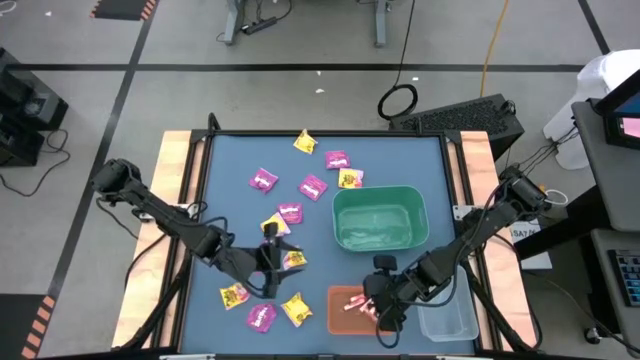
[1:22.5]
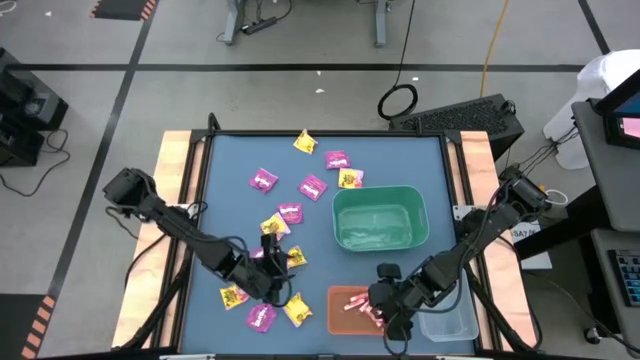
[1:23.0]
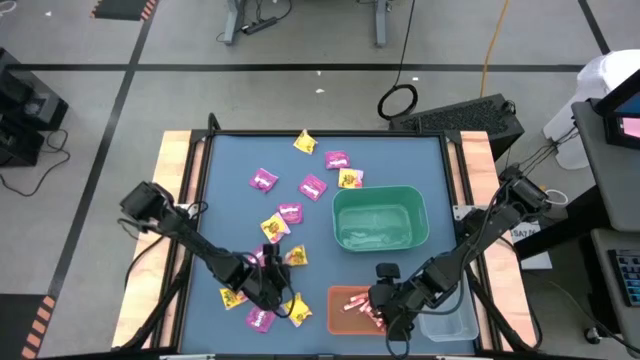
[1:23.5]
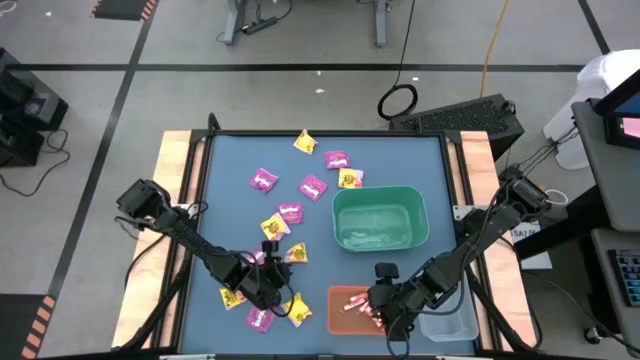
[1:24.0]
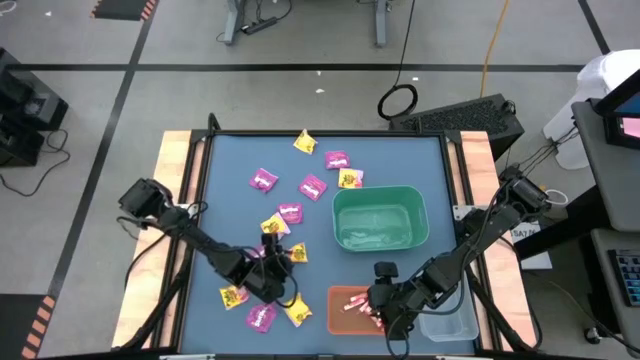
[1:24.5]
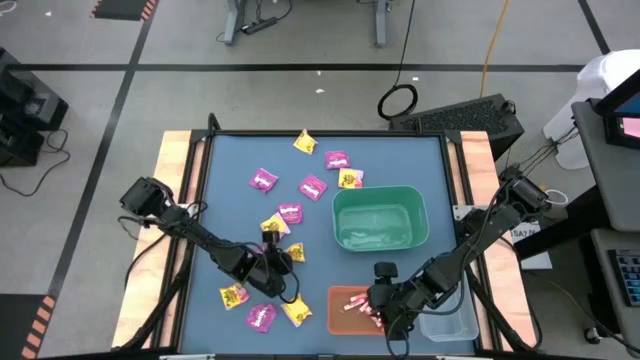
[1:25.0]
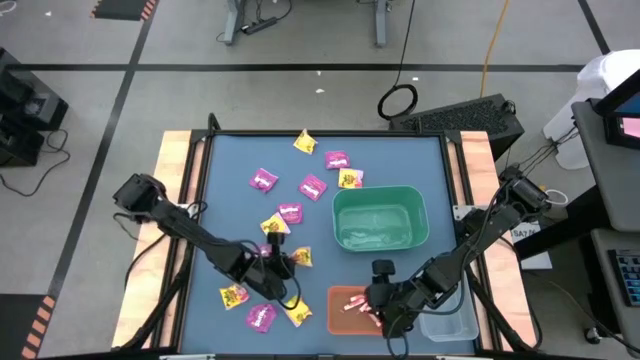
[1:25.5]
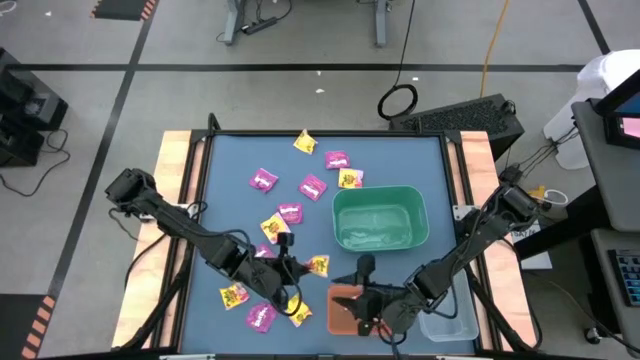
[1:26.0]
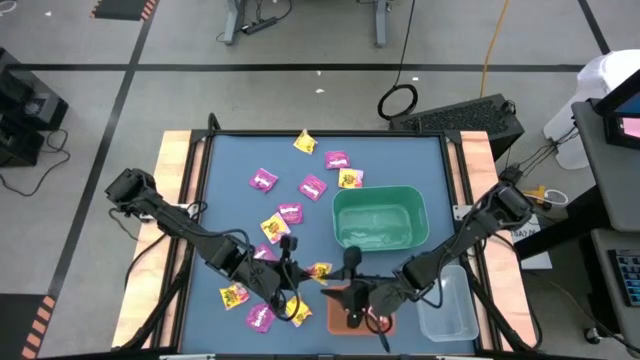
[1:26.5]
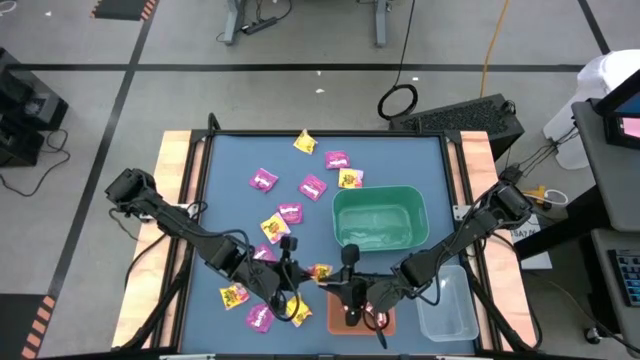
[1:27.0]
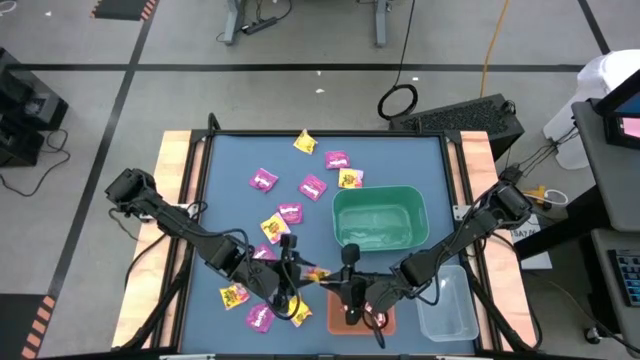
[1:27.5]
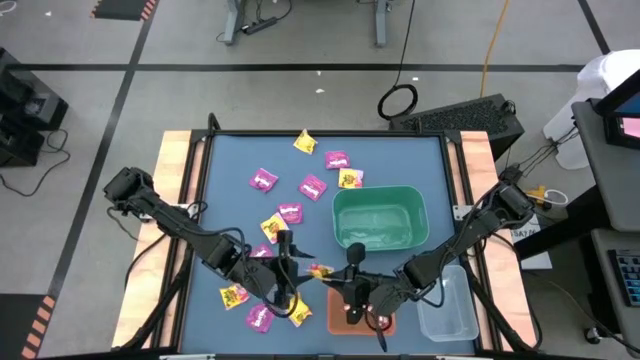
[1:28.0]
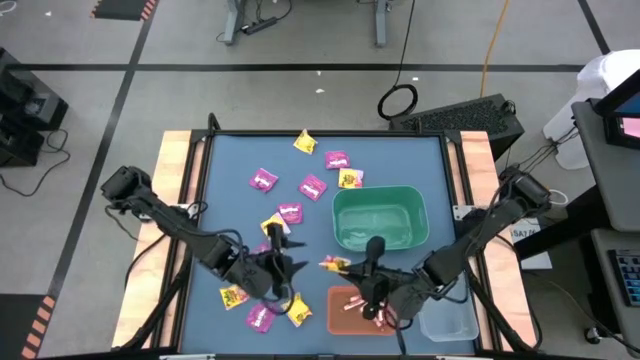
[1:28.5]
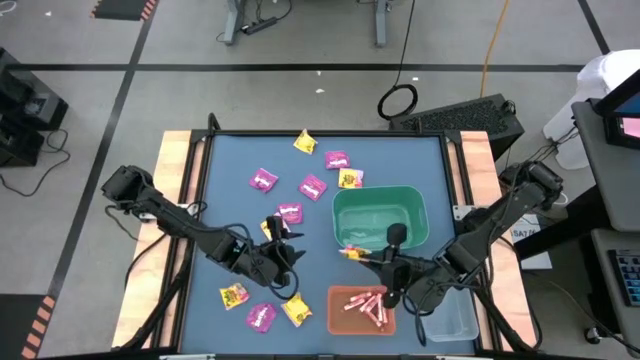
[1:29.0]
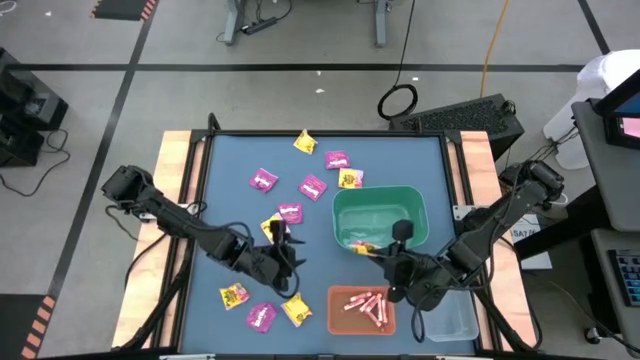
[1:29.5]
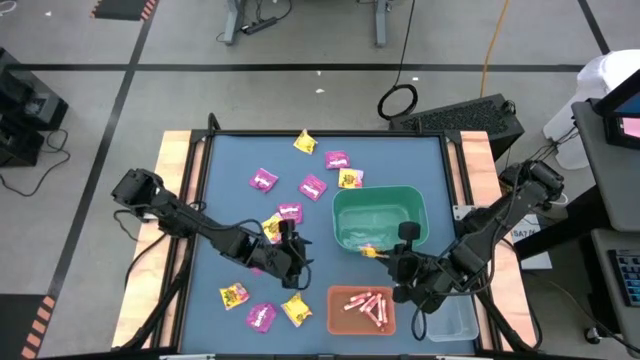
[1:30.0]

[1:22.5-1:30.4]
Task: Sort candy
Put the yellow candy pack into the green bin

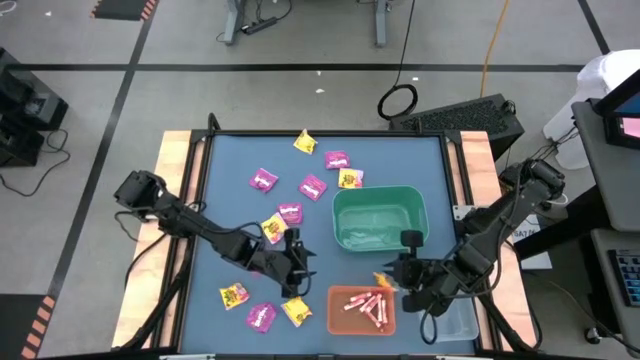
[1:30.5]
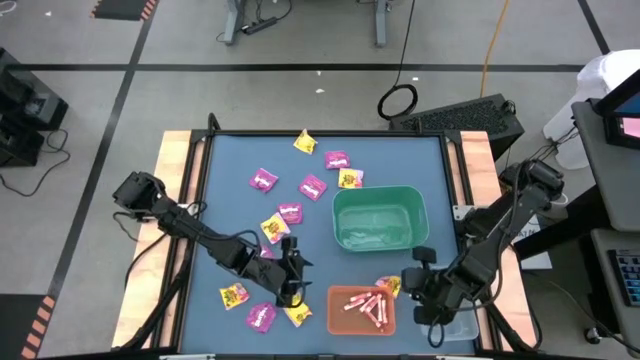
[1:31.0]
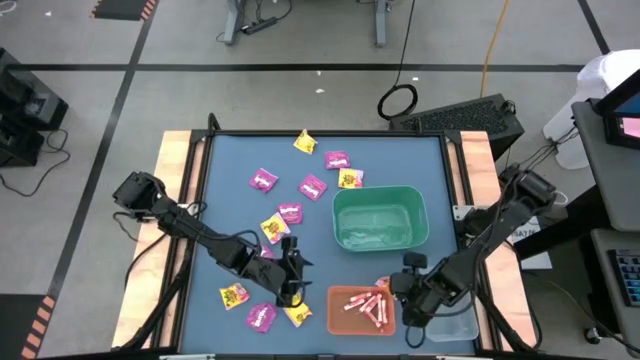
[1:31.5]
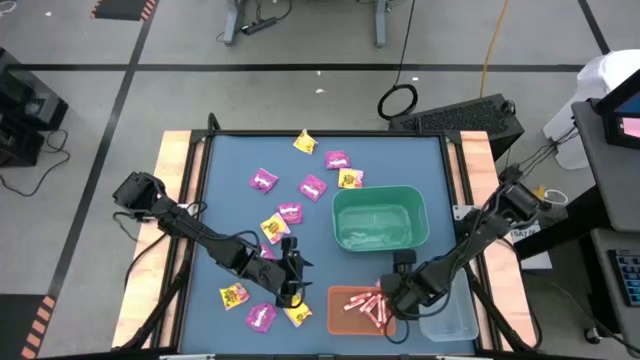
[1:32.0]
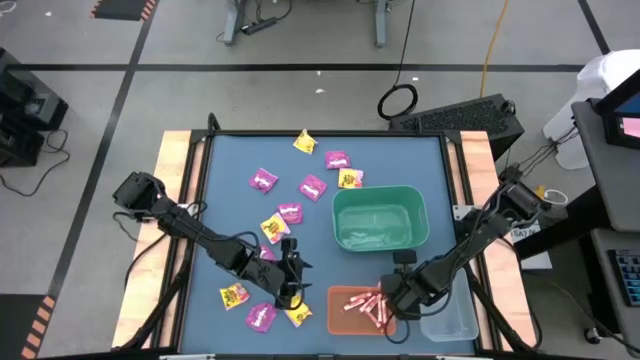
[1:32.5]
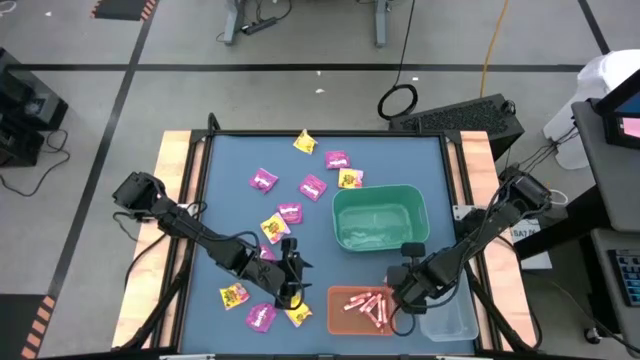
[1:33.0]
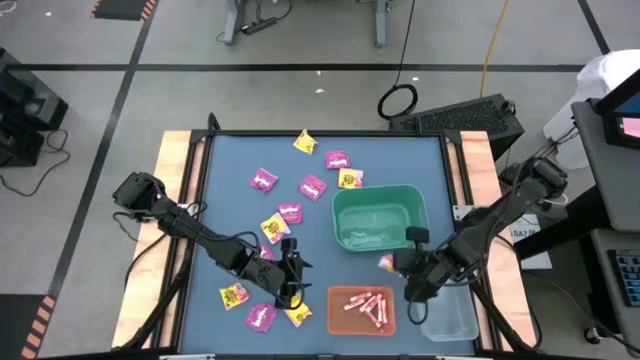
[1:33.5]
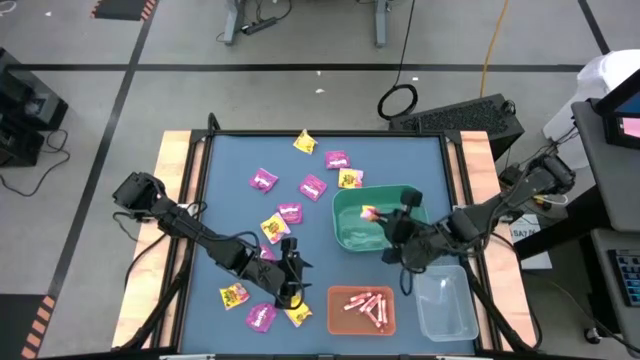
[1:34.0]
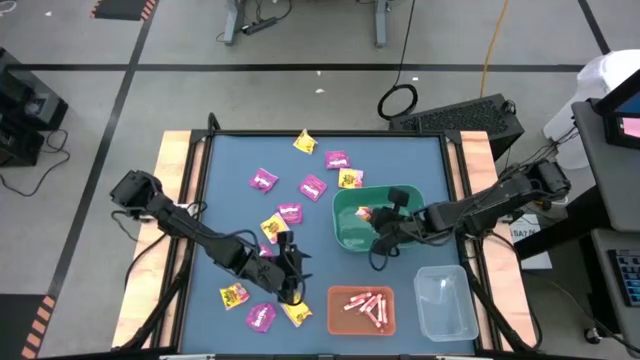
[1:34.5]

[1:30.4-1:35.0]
Put the yellow candy pack into the green bin

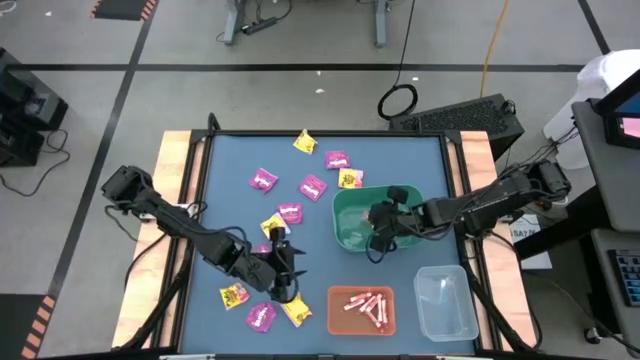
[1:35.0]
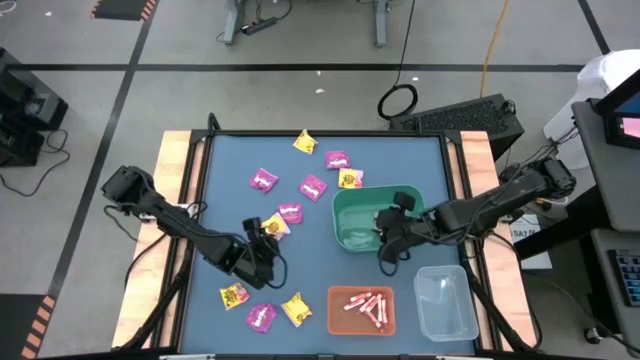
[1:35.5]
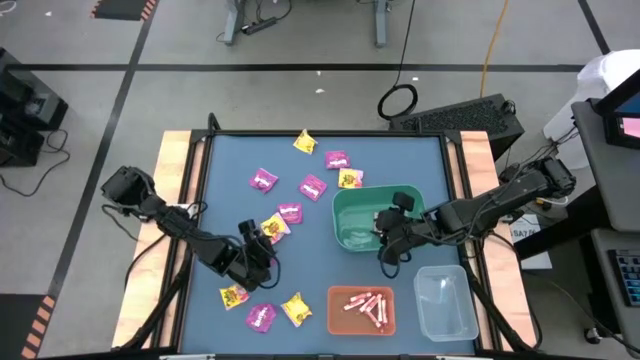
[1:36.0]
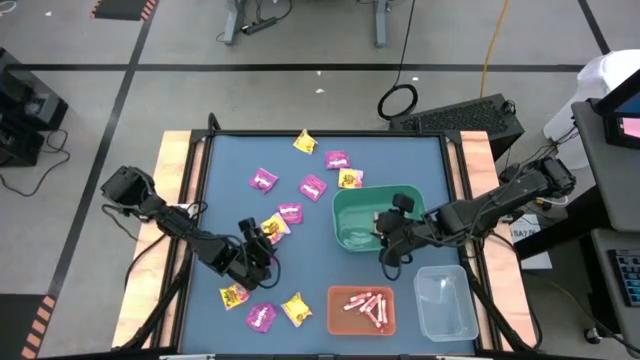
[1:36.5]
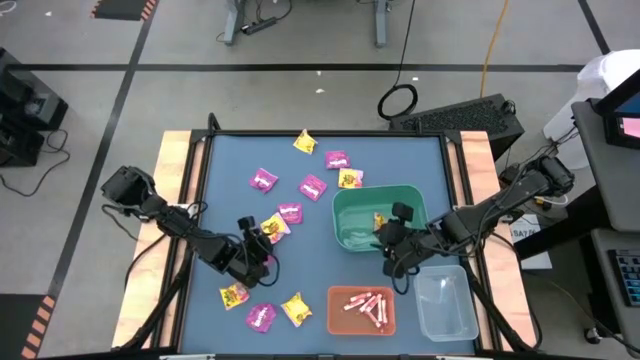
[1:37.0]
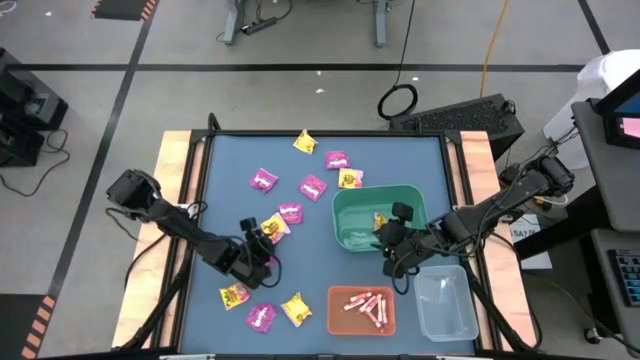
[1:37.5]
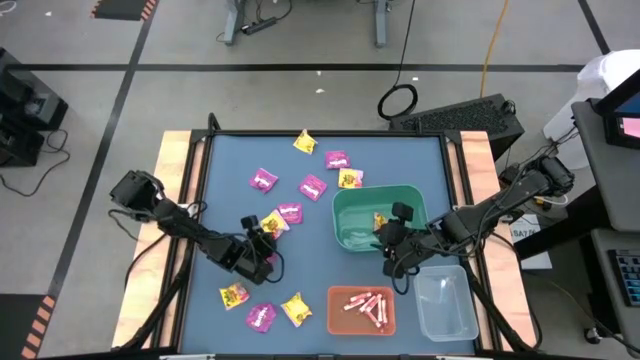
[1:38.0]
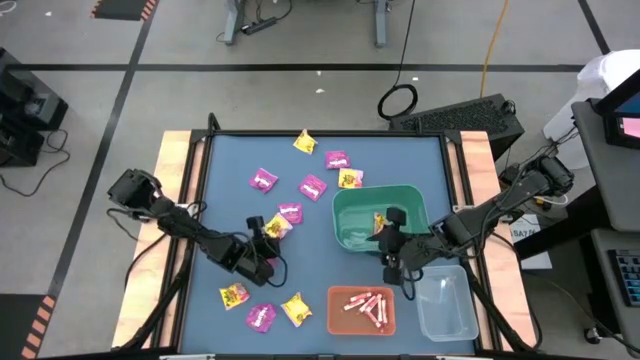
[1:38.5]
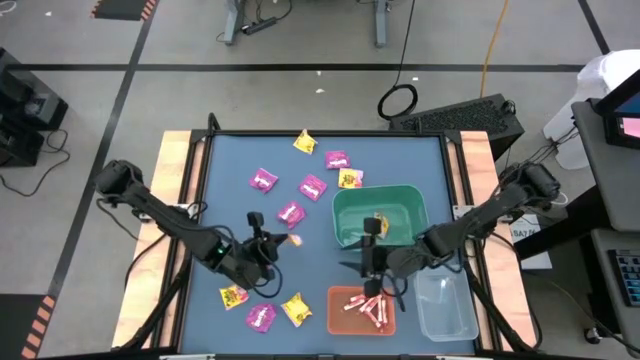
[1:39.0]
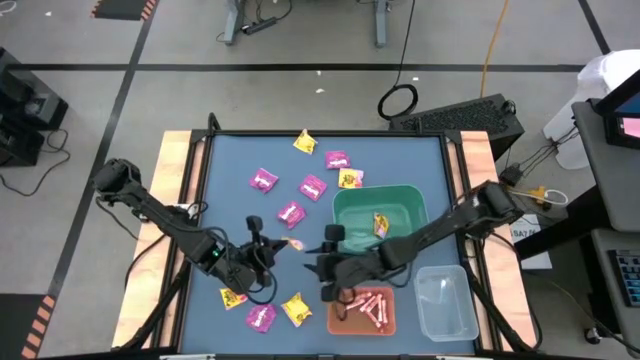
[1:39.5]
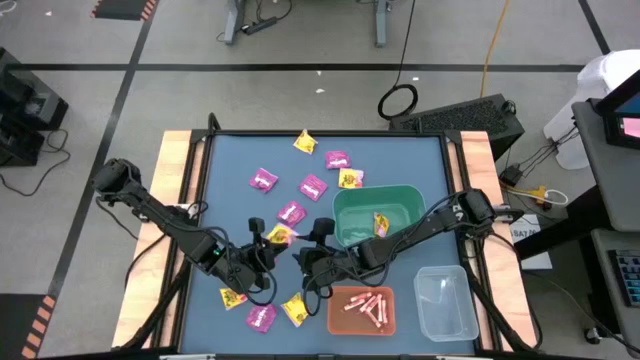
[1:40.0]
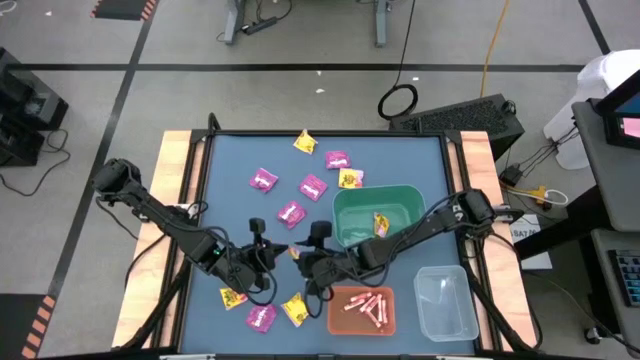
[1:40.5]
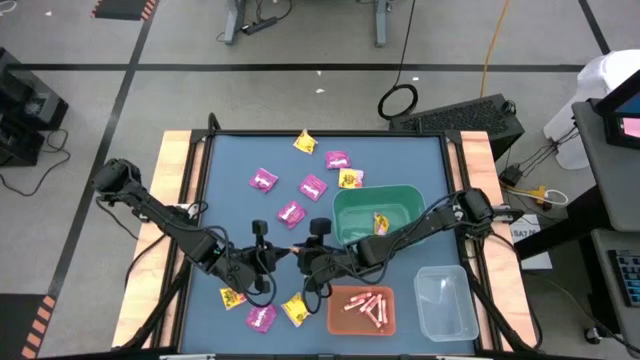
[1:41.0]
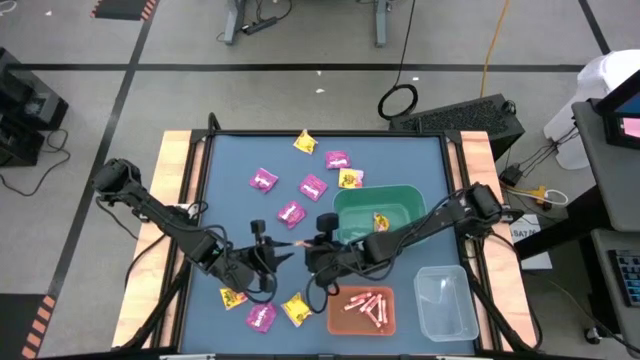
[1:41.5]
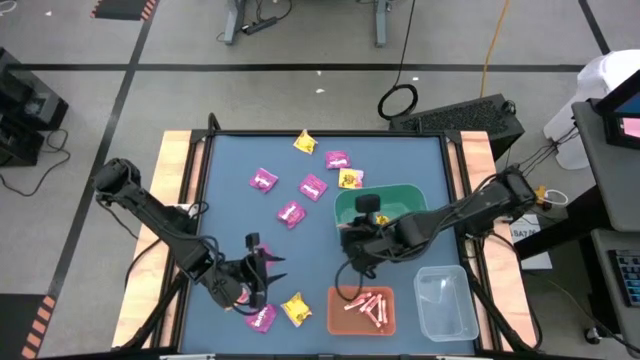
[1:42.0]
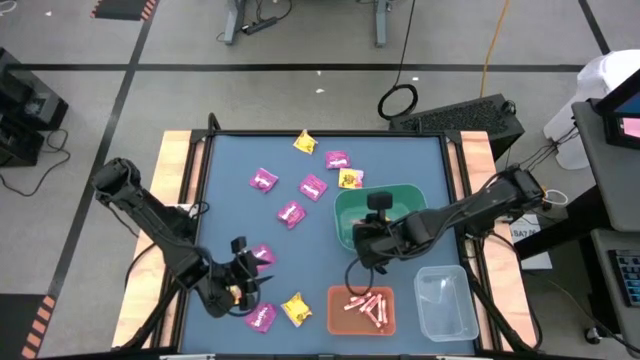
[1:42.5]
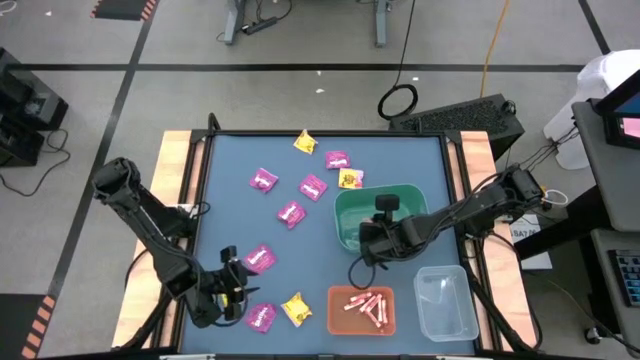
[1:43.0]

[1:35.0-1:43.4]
Put the yellow candy pack into the green bin

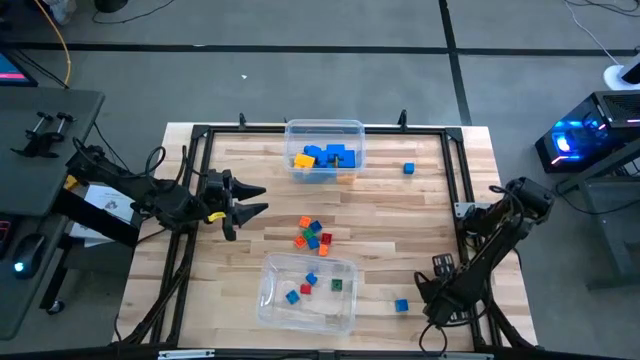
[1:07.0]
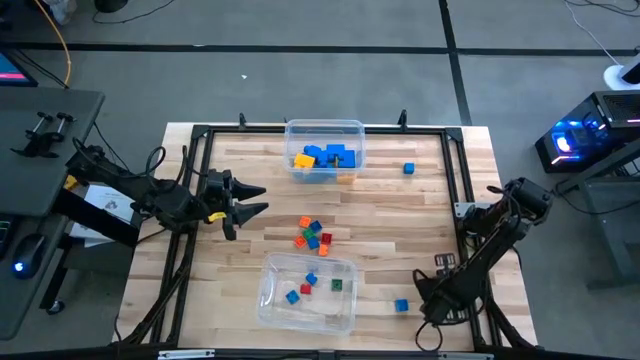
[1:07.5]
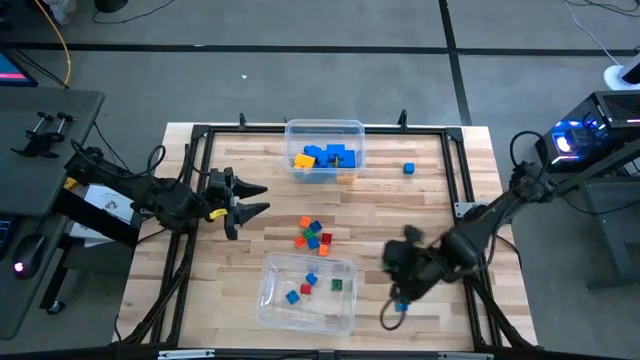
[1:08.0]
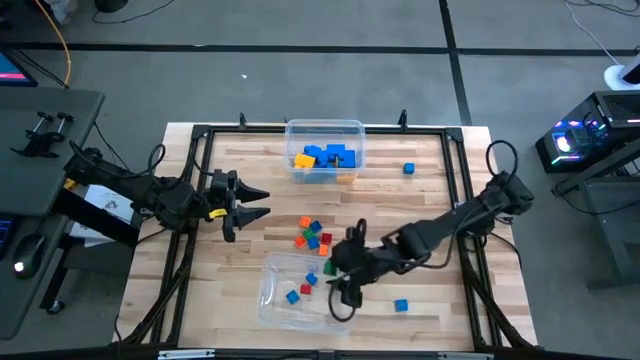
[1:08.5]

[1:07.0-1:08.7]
Task: Sort blocks by size
Put the small green game piece into the bottom transparent bin
